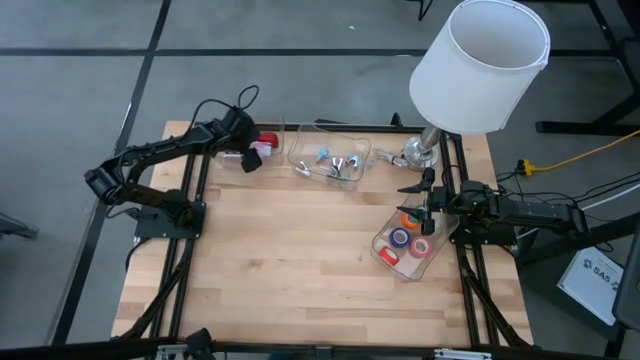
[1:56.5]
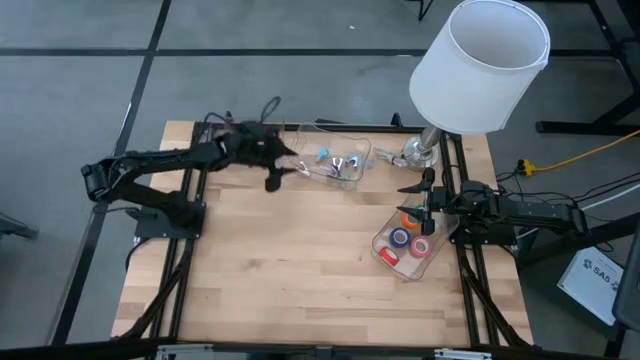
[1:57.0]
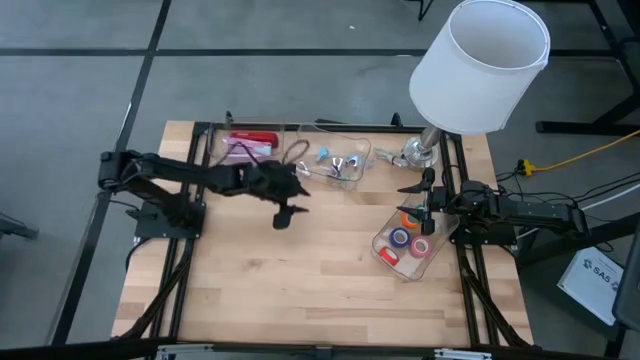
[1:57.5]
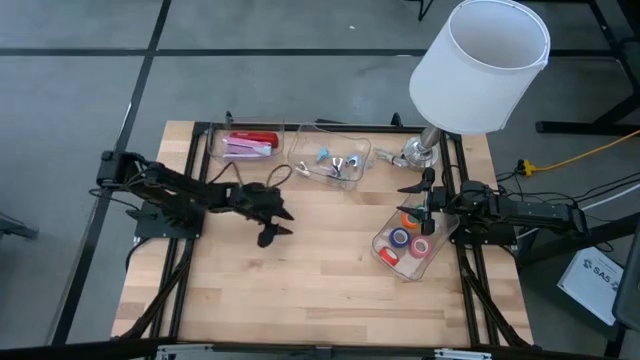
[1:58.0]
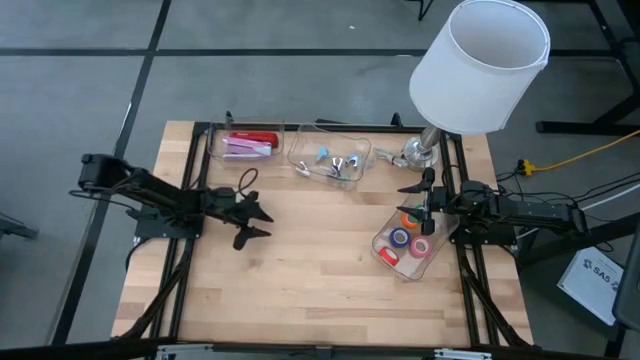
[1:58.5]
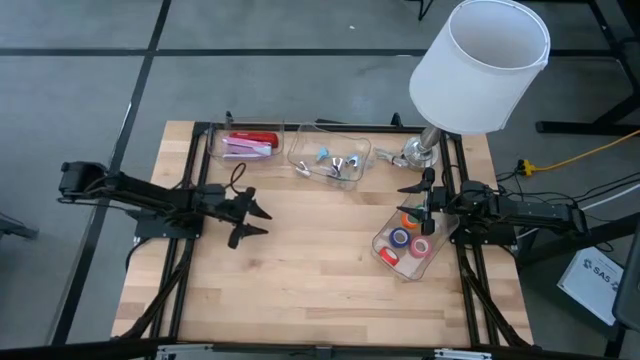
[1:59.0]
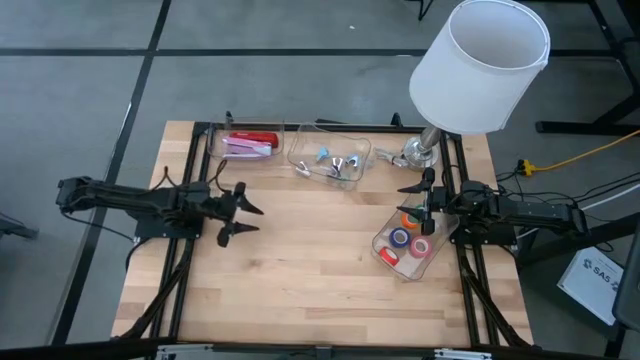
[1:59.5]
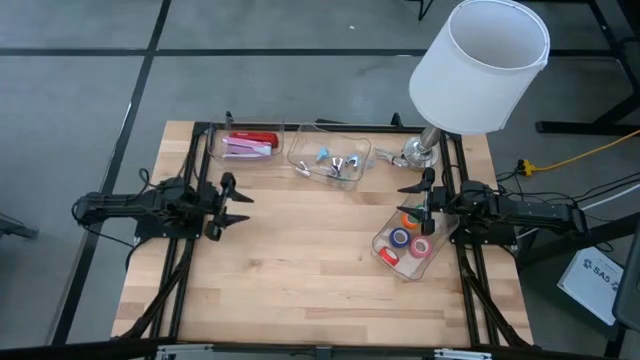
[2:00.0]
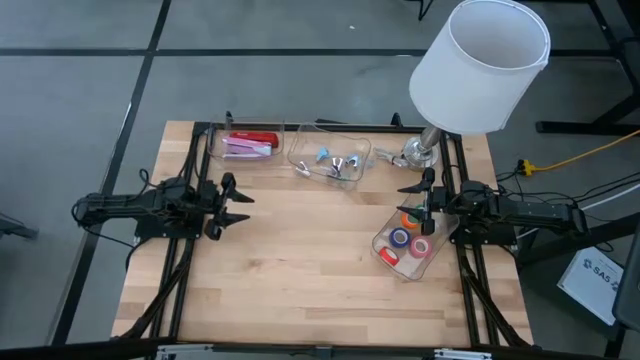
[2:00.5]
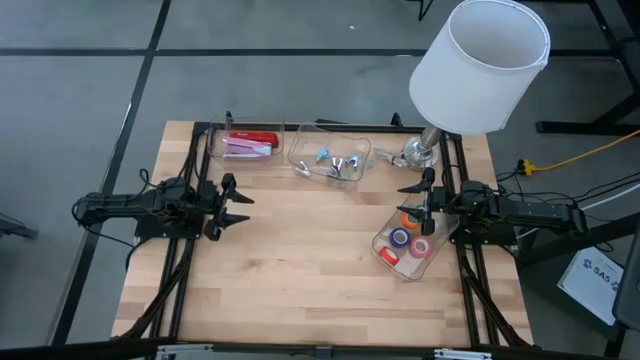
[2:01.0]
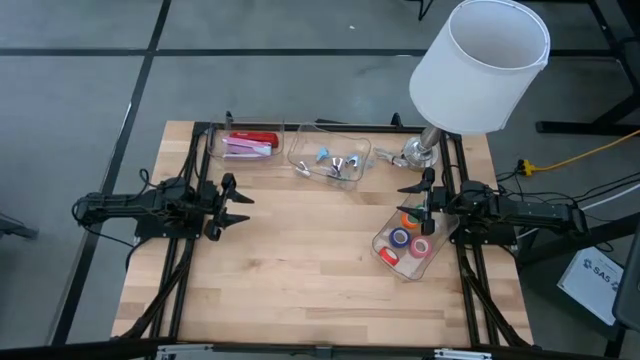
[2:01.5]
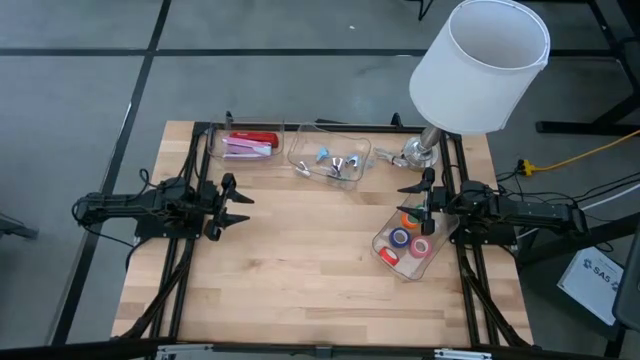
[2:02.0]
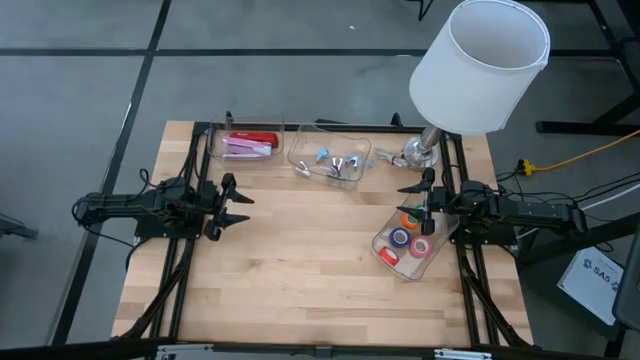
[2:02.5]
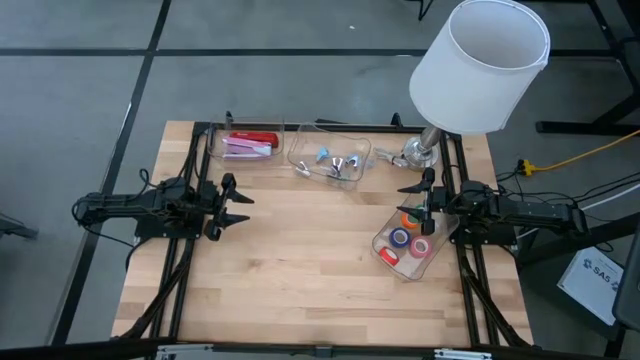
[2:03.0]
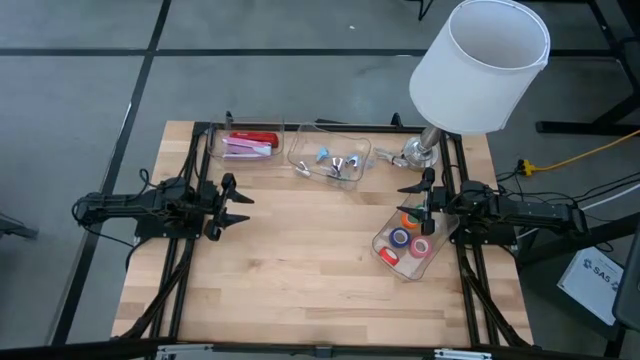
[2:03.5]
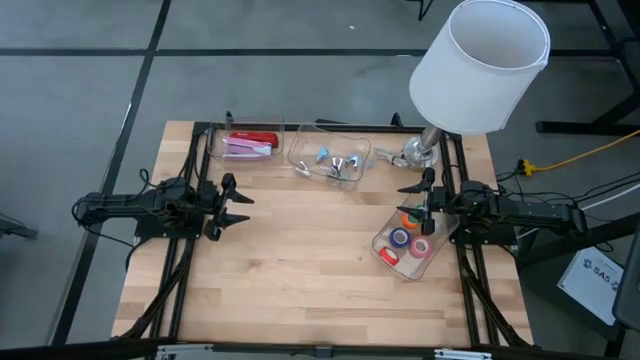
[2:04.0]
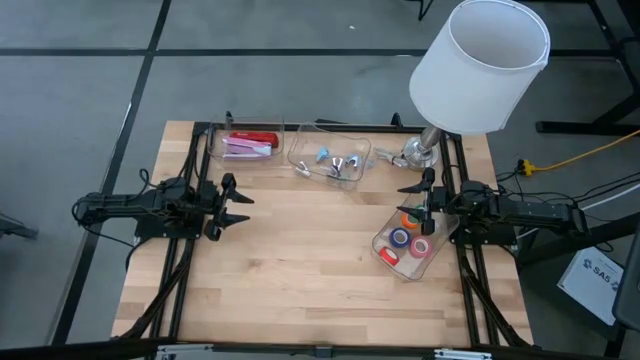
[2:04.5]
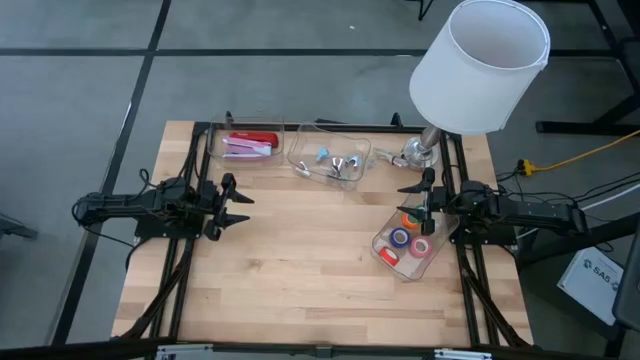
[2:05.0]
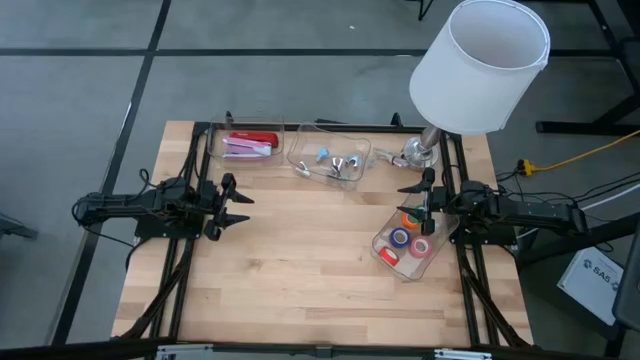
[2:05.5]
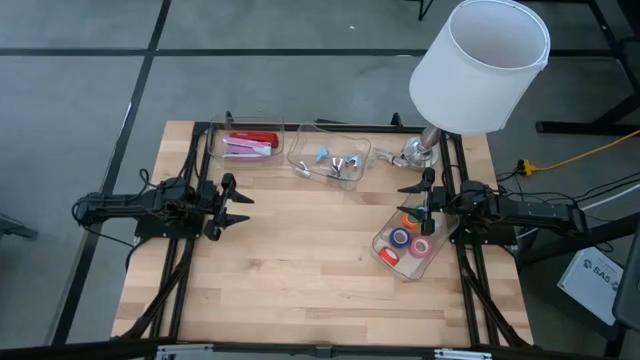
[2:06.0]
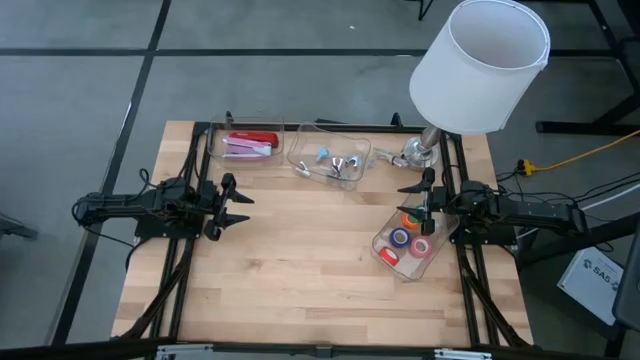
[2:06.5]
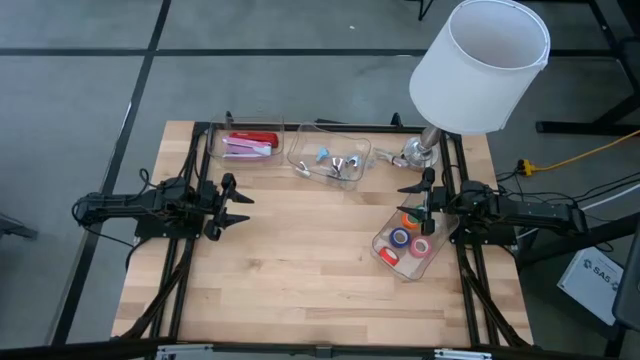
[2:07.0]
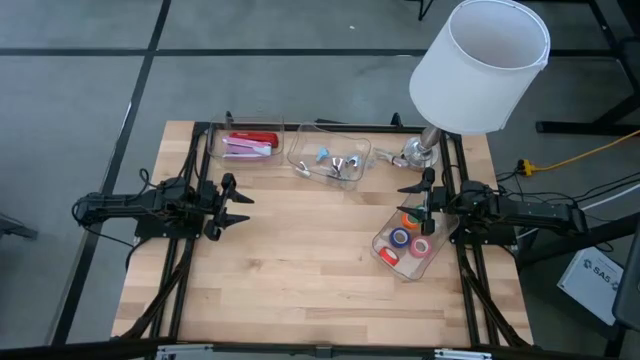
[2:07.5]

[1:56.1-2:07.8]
Task: Pick and place Stapler, Stapler remover, tape
Return to Home Position

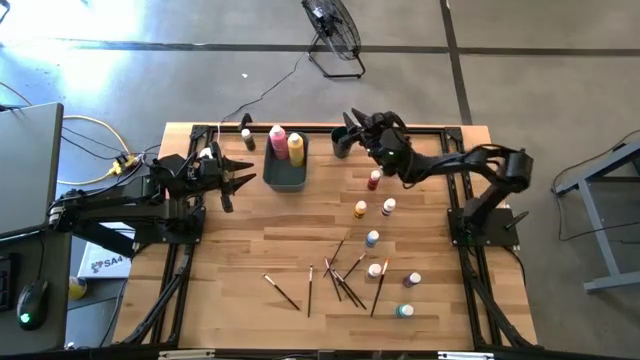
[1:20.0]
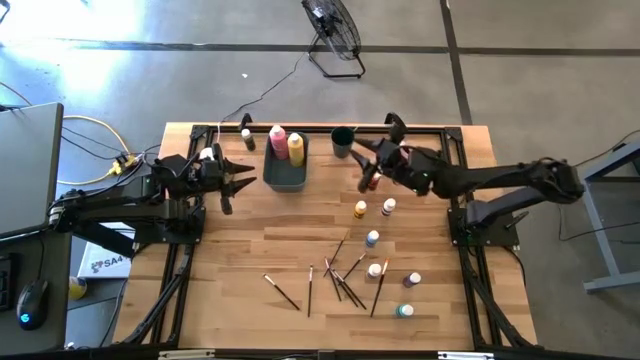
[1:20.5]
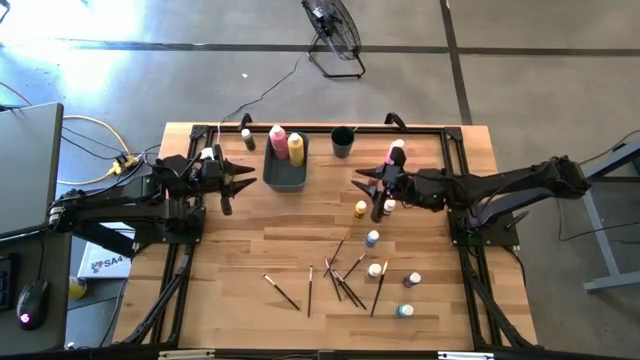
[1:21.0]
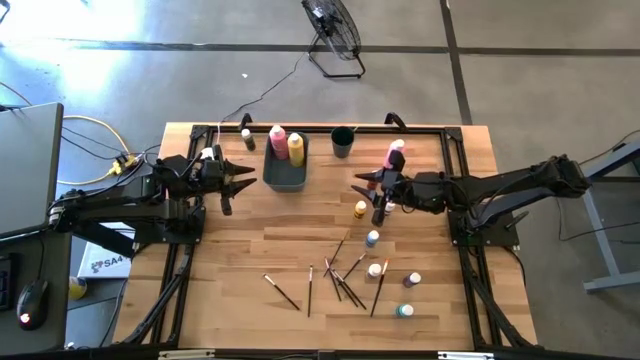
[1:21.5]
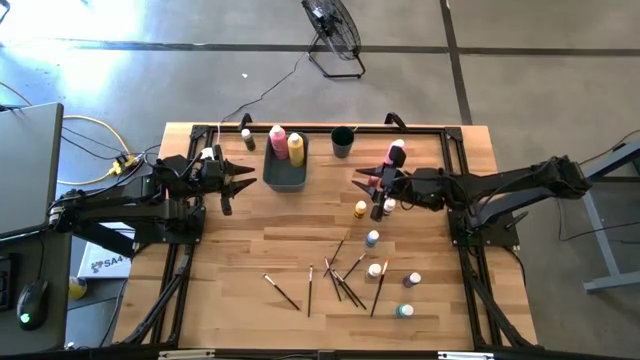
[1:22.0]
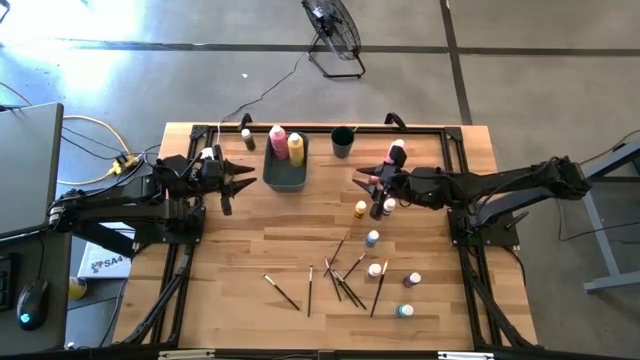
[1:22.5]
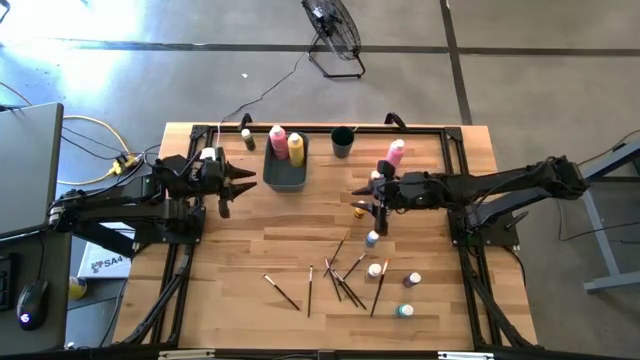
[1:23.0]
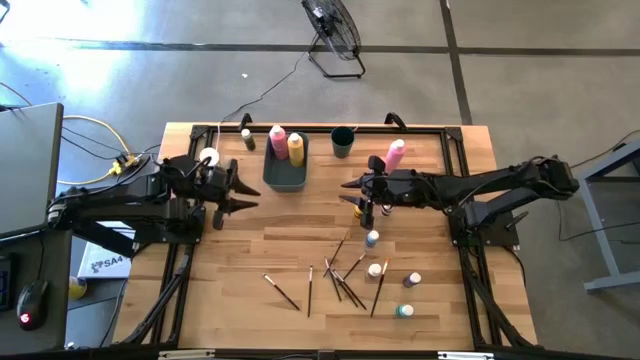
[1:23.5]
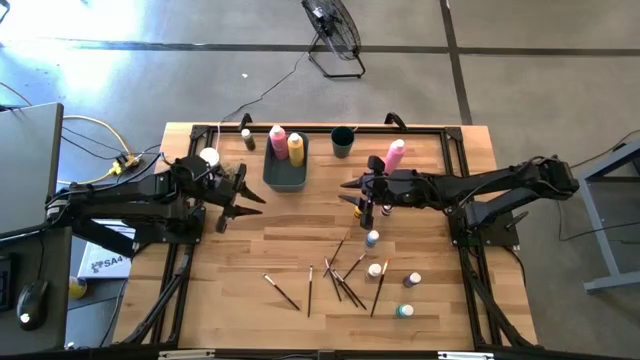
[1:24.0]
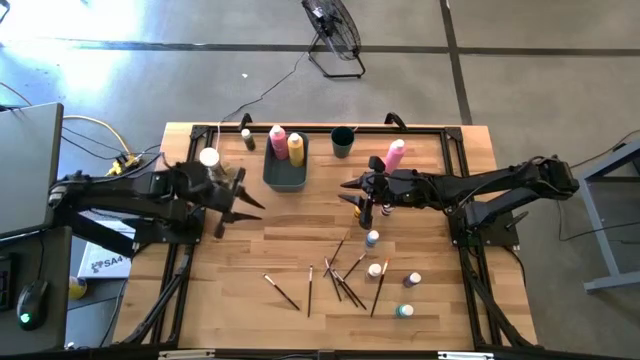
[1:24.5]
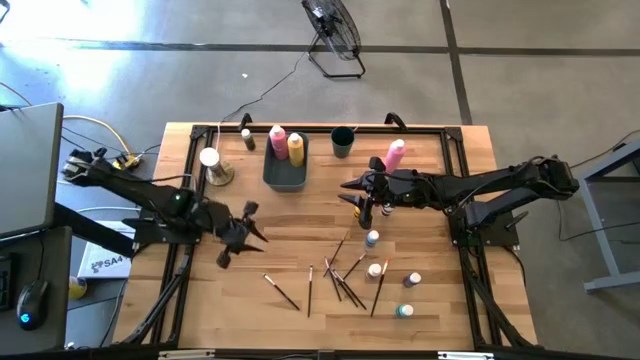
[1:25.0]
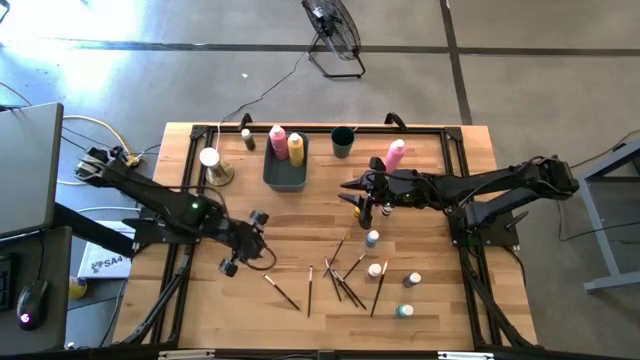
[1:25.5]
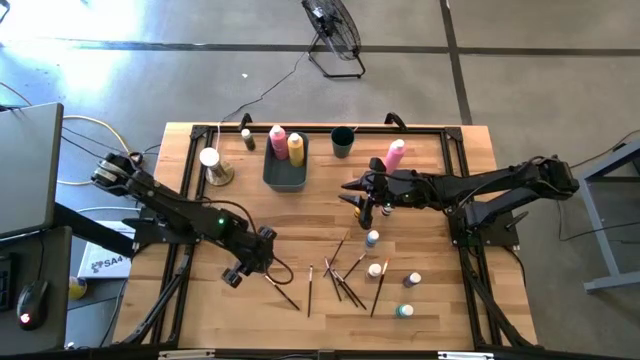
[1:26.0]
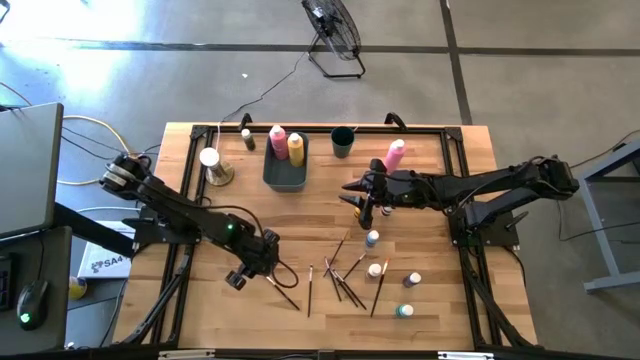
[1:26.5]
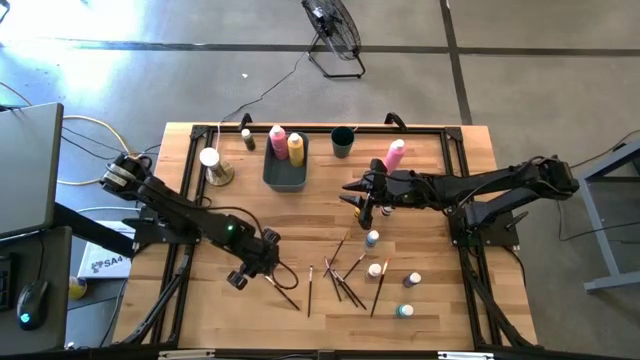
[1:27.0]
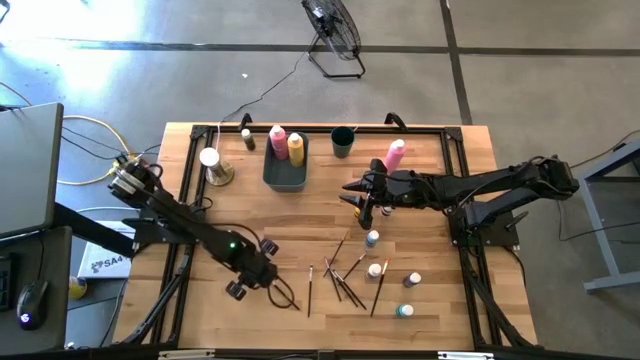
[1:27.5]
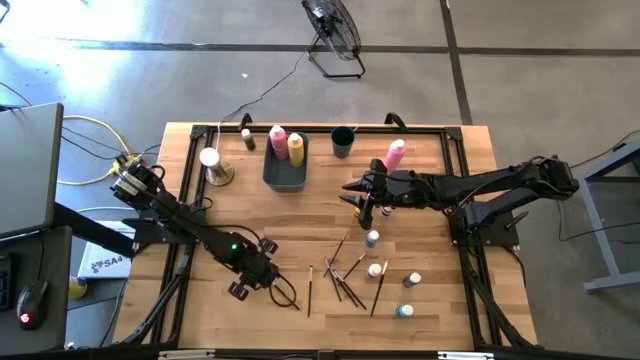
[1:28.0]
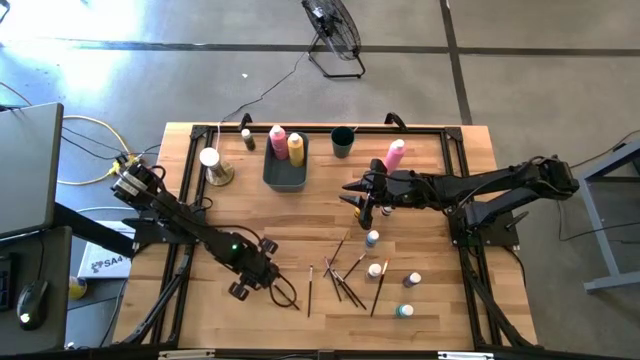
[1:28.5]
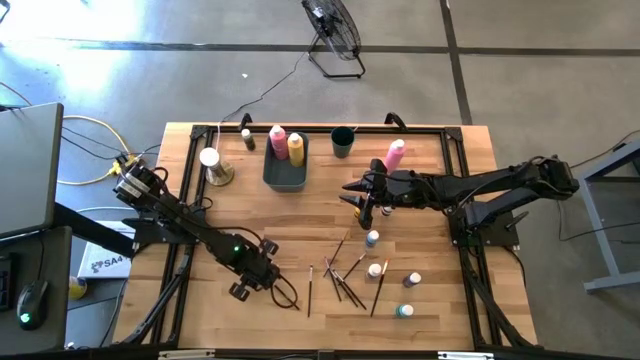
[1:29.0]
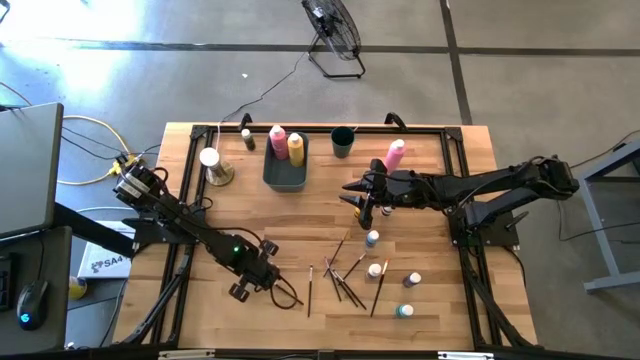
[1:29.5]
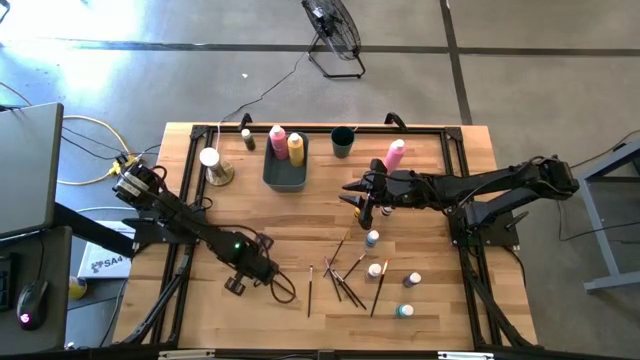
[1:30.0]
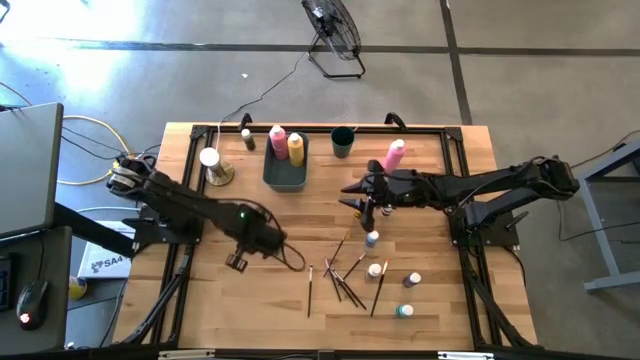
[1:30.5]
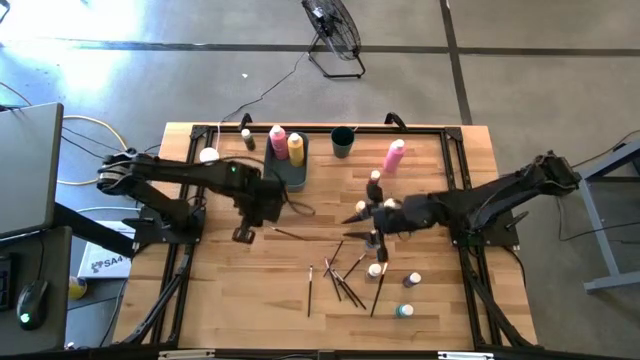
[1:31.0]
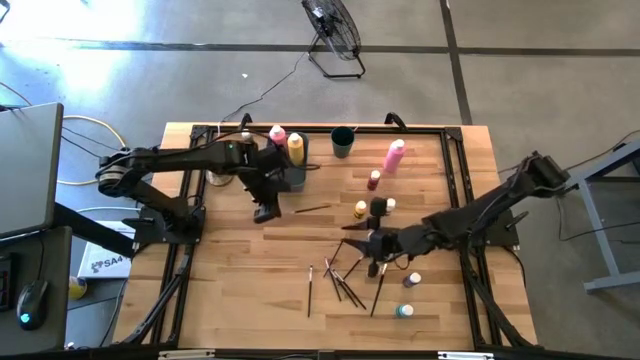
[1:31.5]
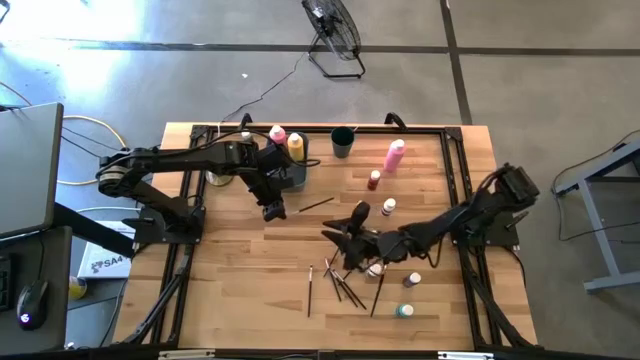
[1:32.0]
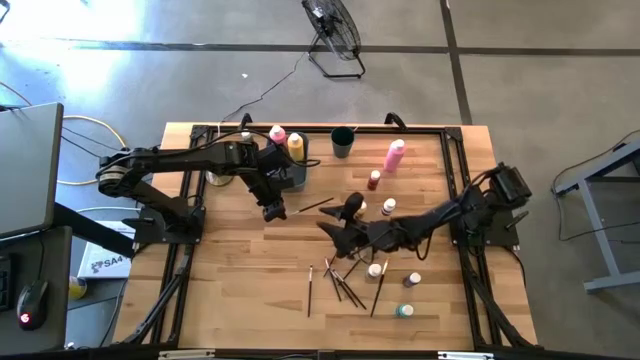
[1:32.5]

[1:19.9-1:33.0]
Task: Pick & Place Paint Supplies
Put the silver paint brush into the green cup
